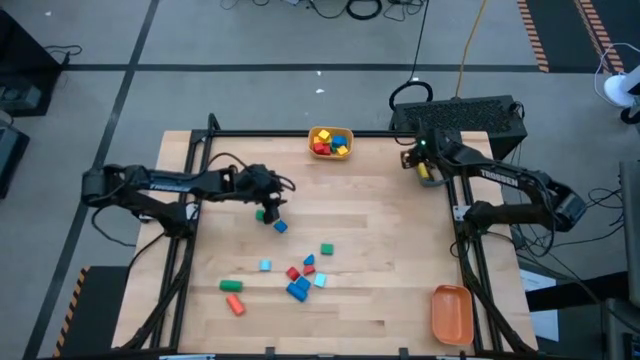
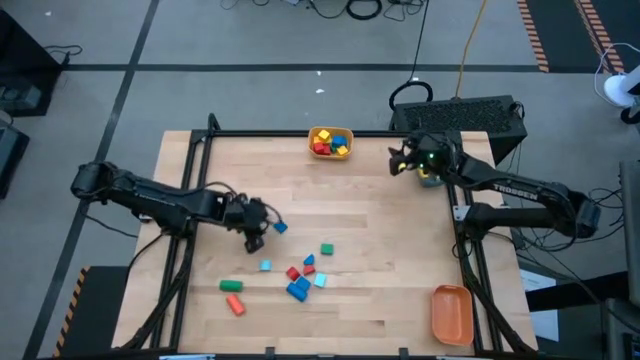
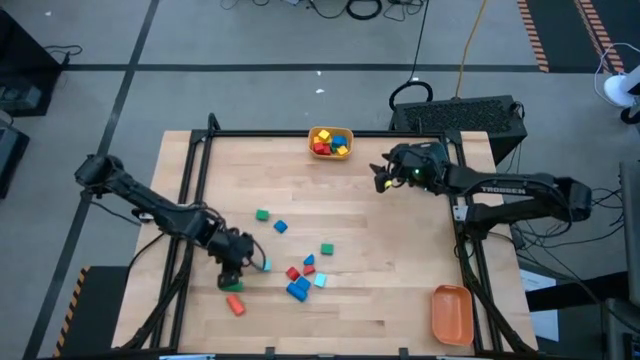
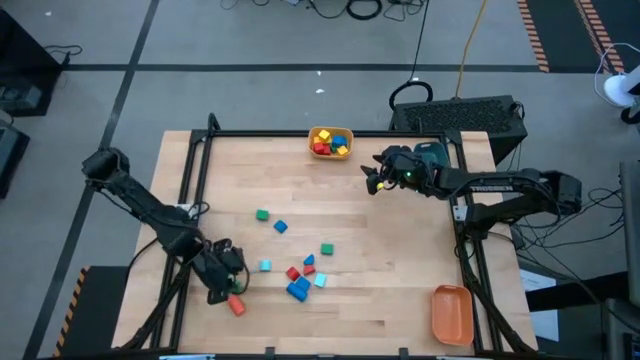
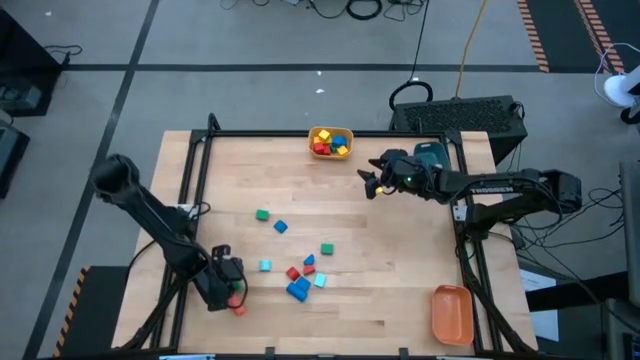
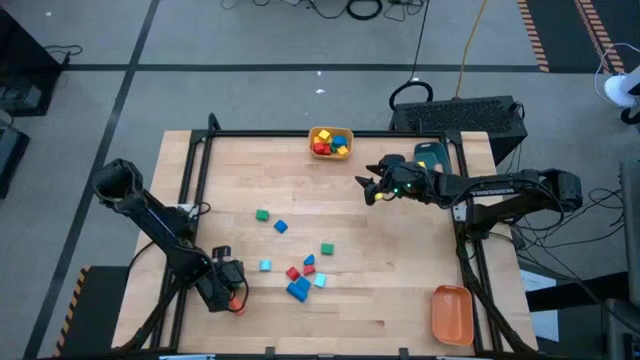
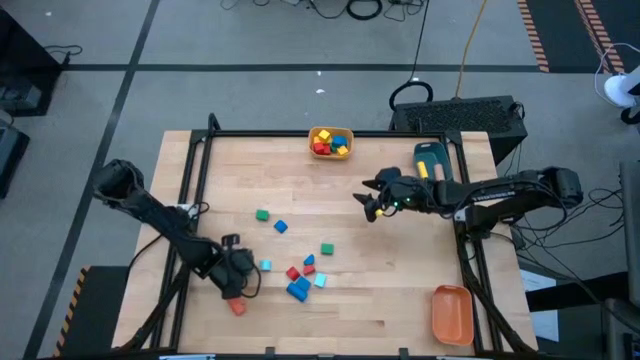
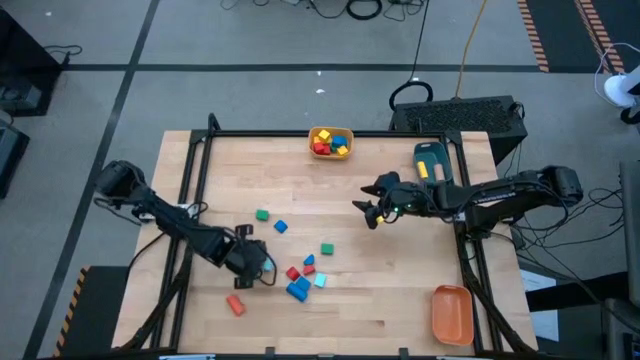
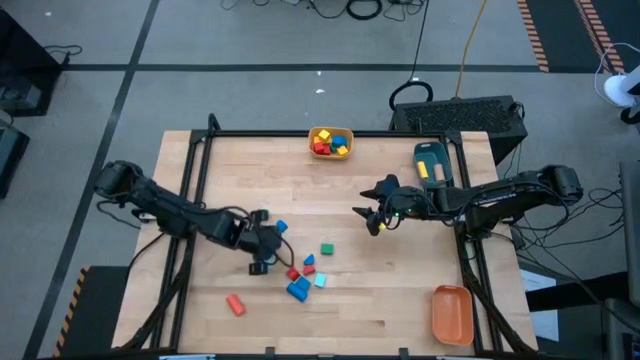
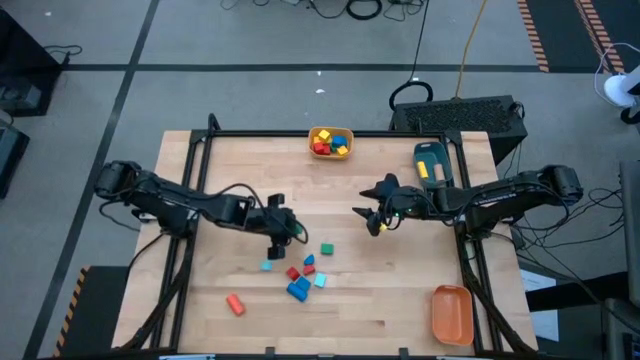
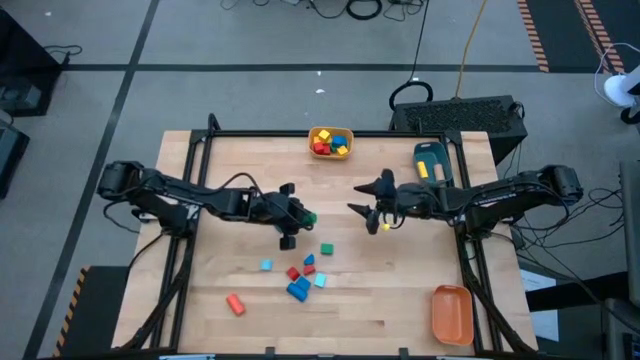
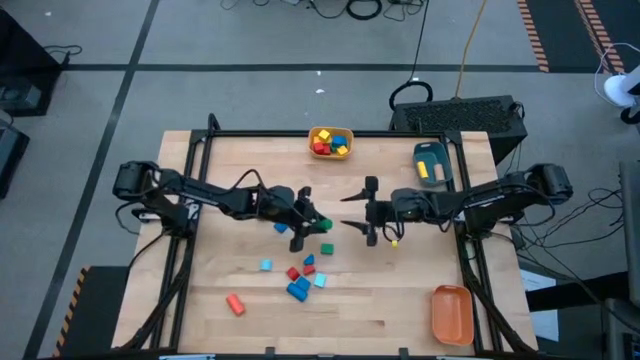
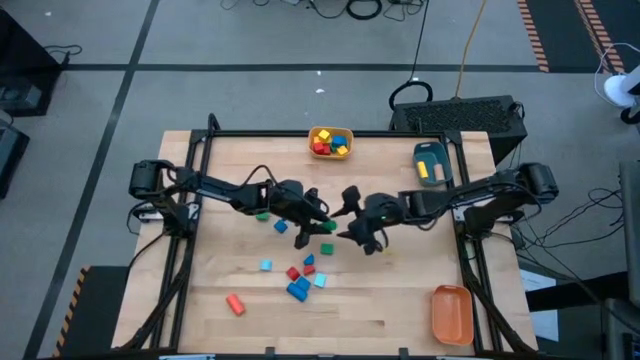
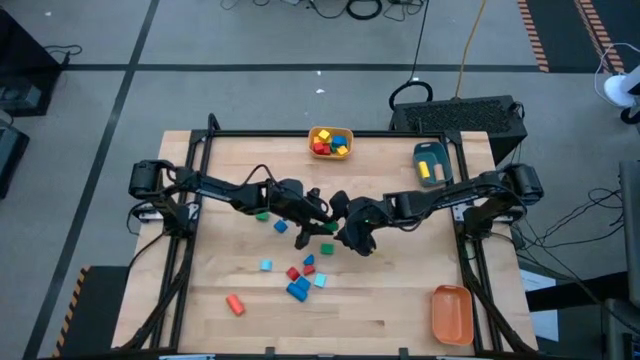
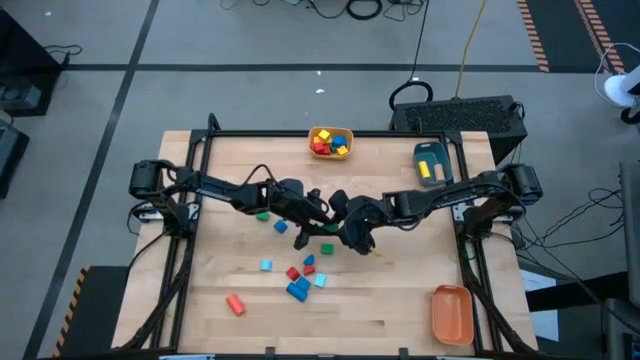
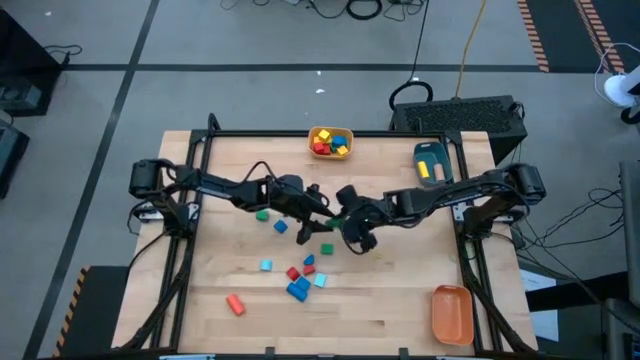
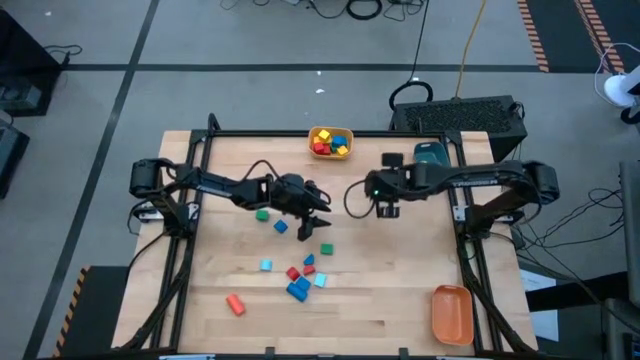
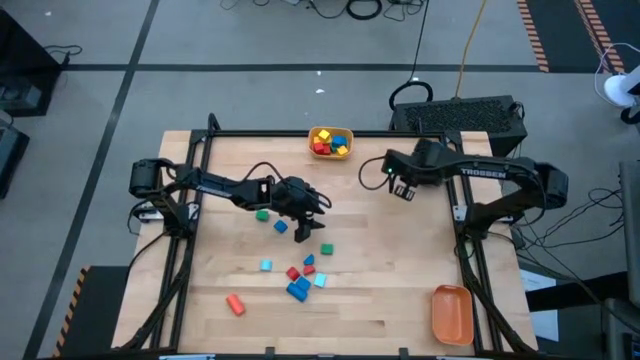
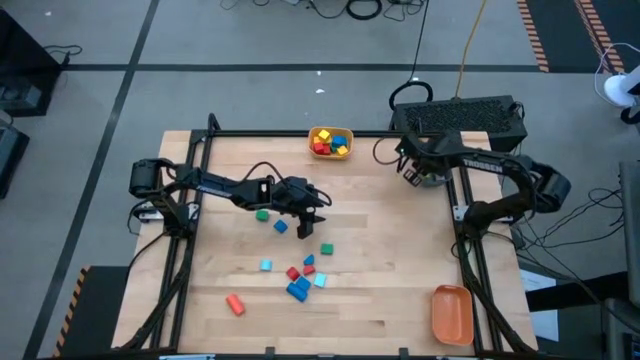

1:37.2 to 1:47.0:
Task: Sort blocks by size
Put the green cylindrical block into the blue bin

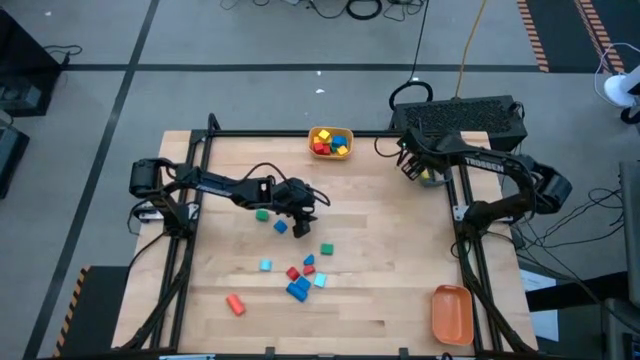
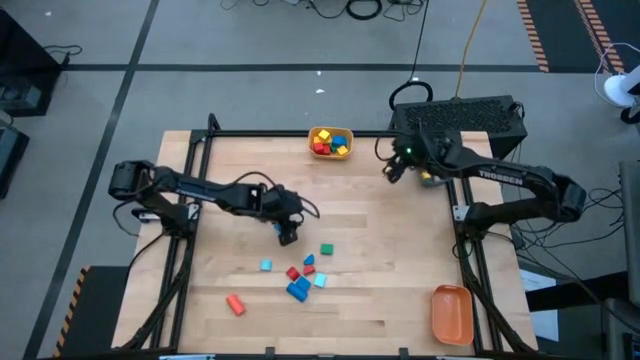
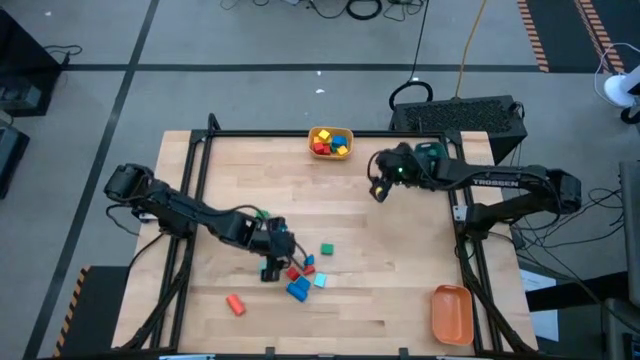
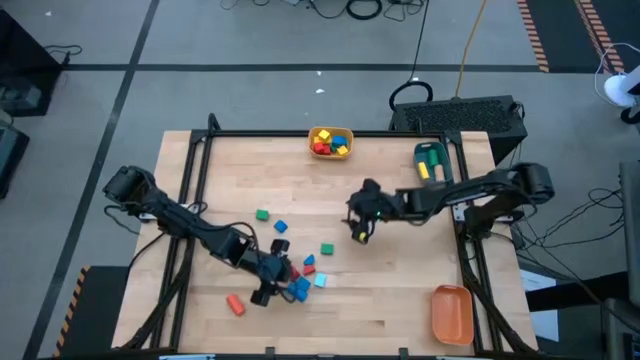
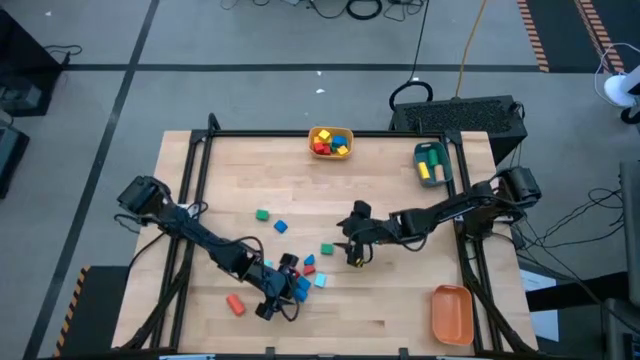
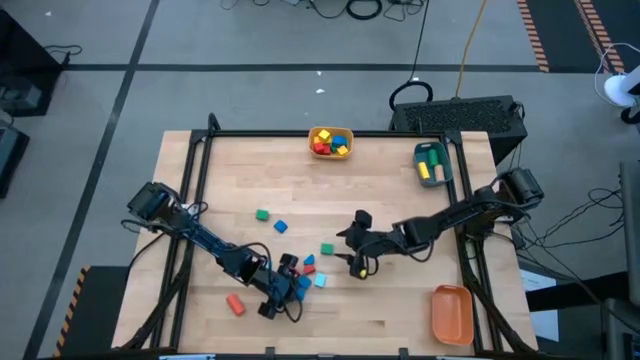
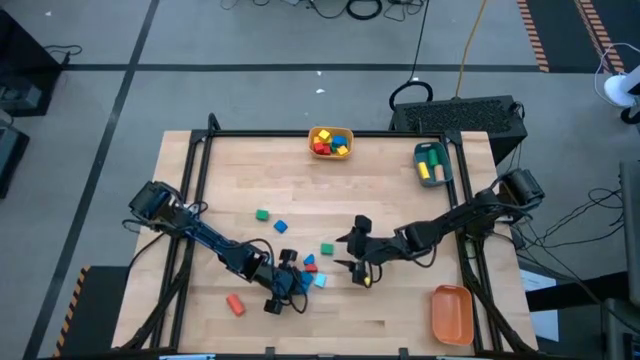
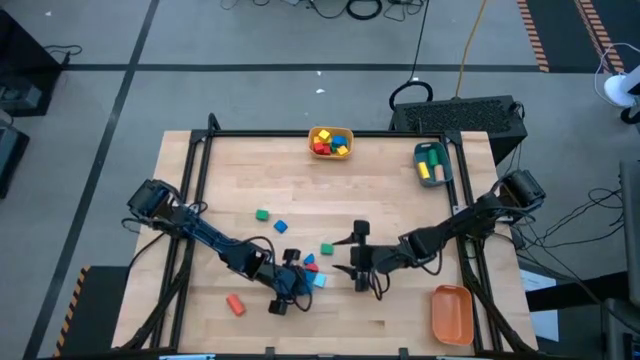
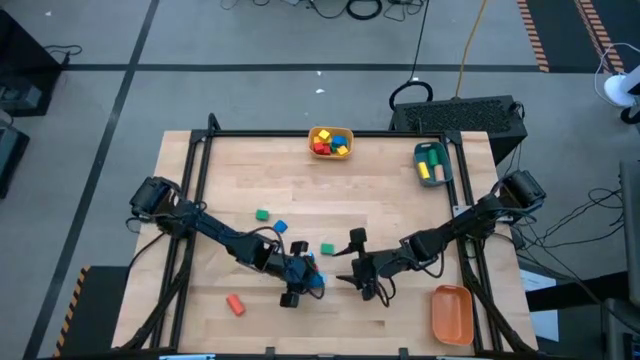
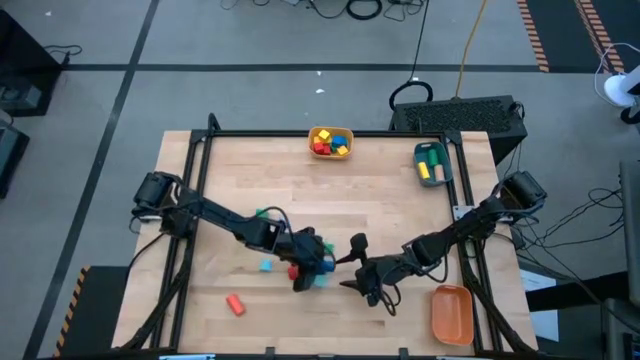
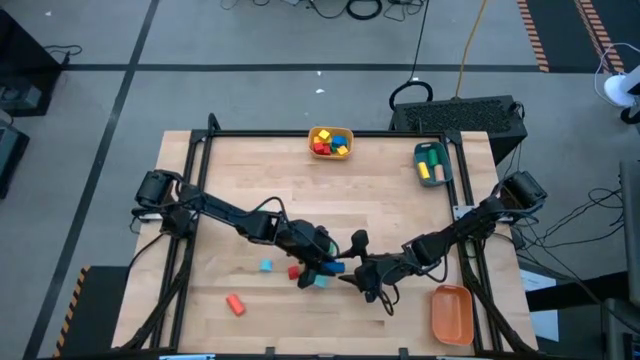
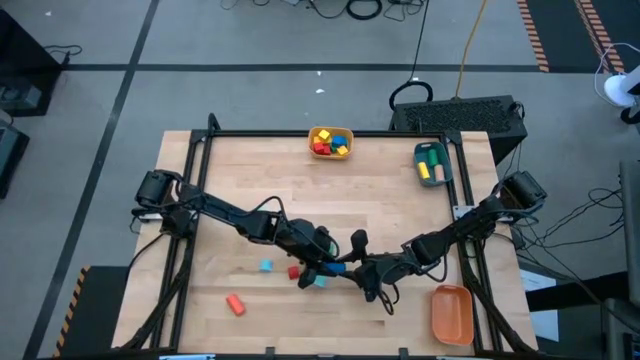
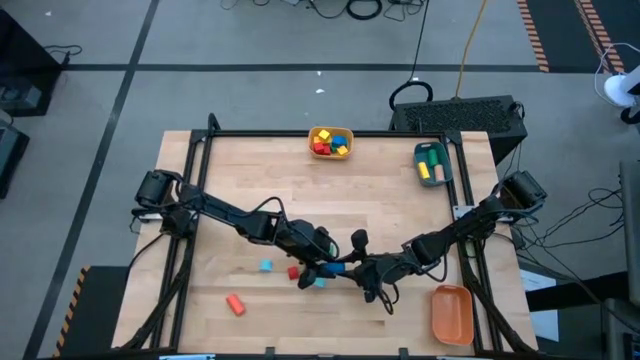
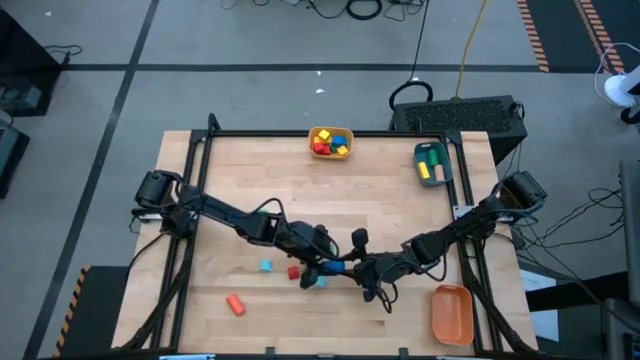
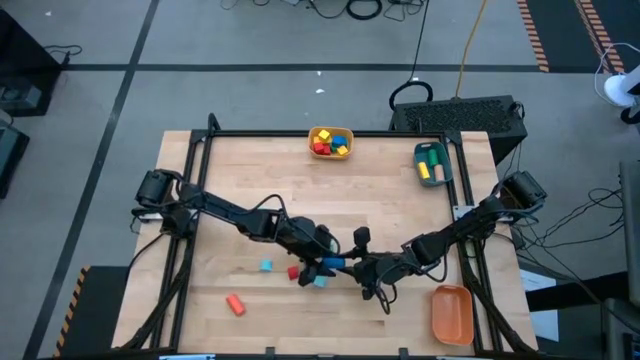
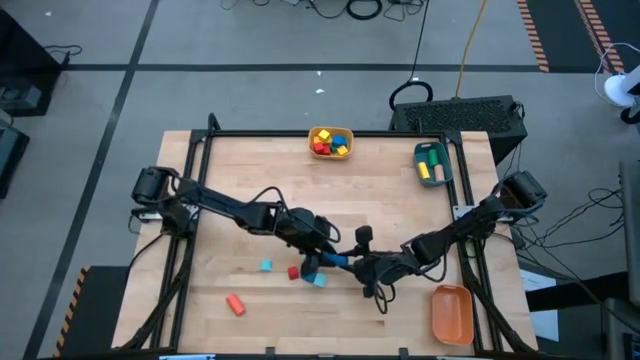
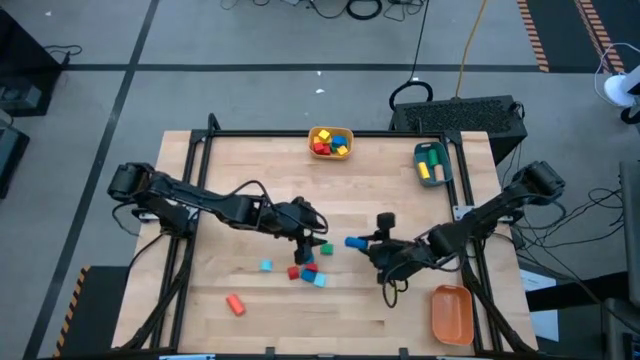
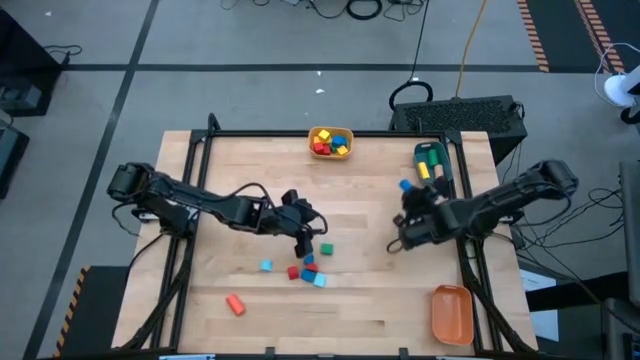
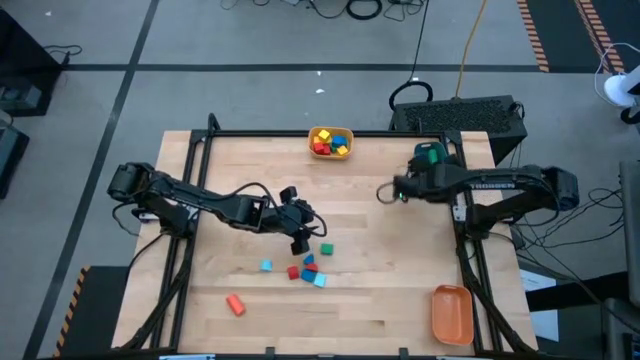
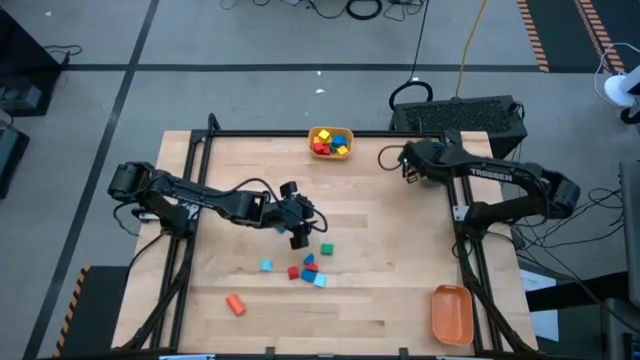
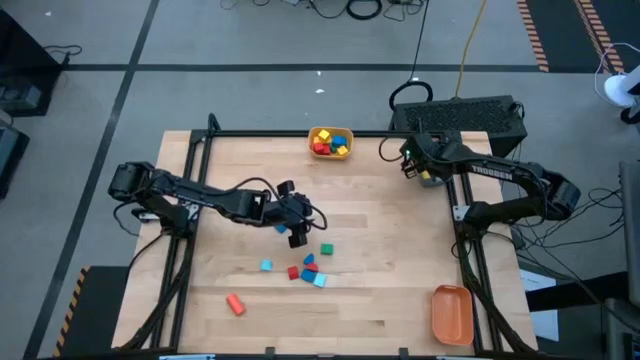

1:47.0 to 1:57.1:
Put the blue cylindrical block into the blue bin

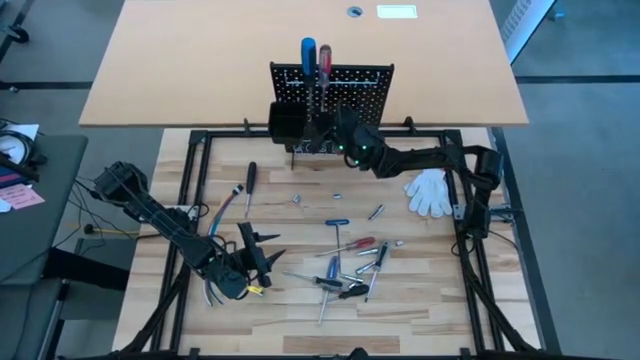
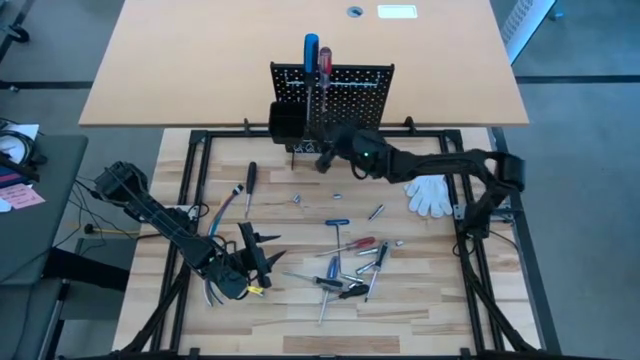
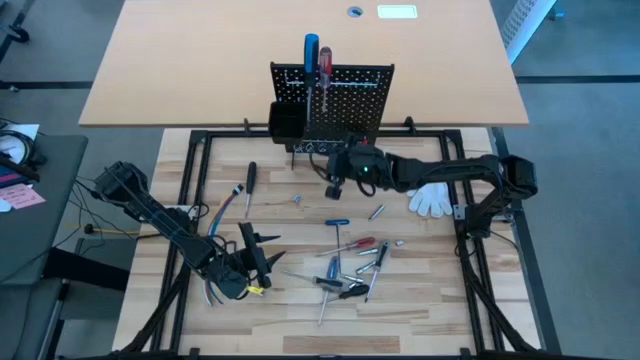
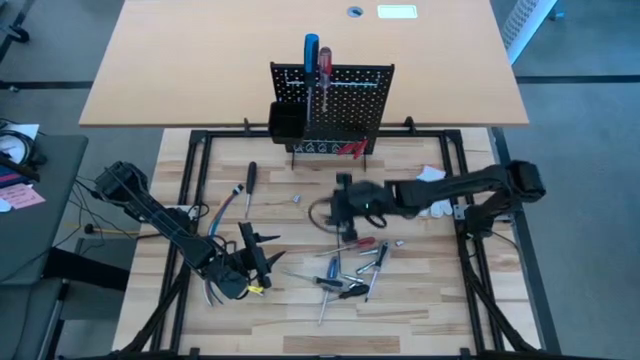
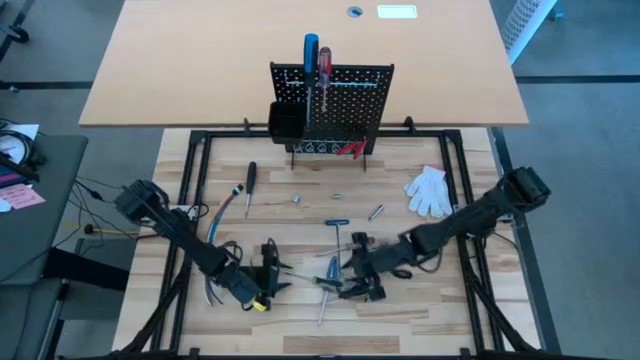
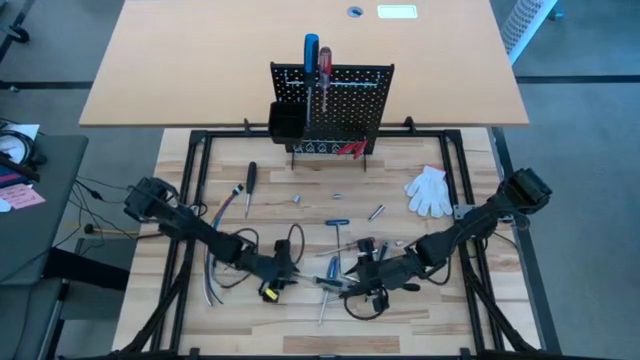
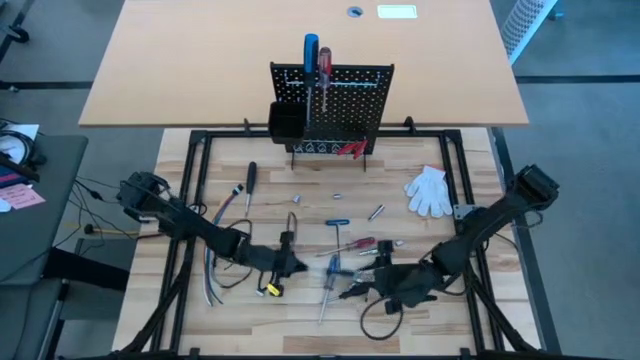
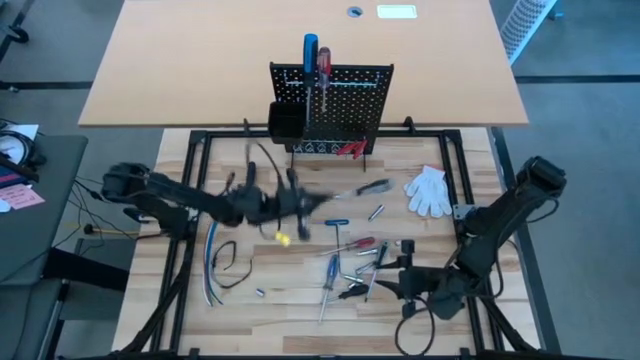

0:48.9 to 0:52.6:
Task: Hang tools onto peg board
Hang the gray screwdriver on the black pegboard
